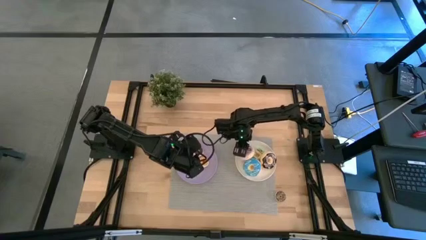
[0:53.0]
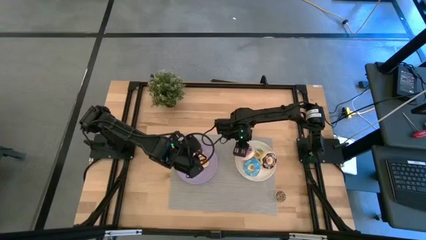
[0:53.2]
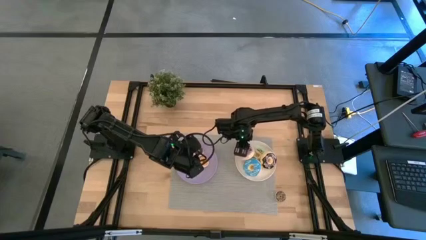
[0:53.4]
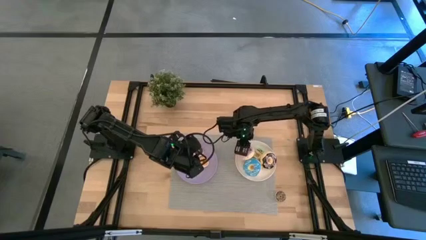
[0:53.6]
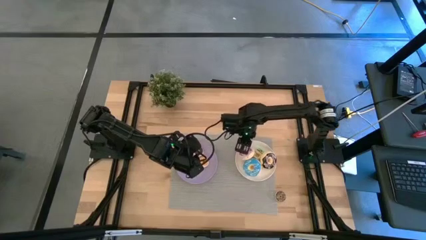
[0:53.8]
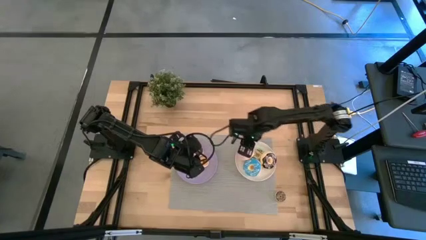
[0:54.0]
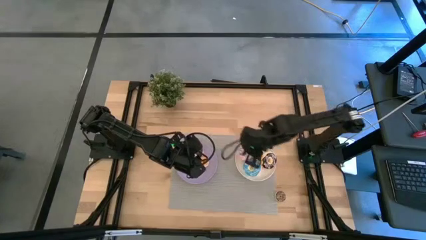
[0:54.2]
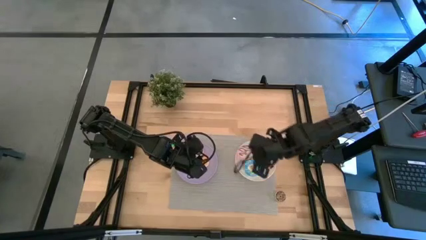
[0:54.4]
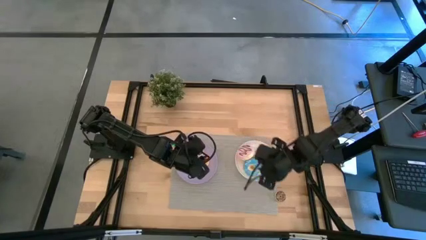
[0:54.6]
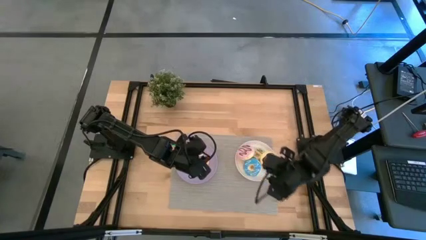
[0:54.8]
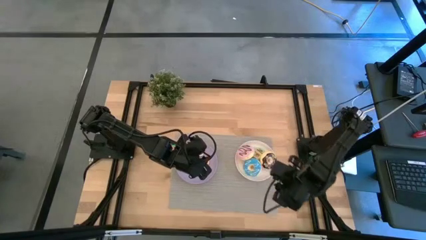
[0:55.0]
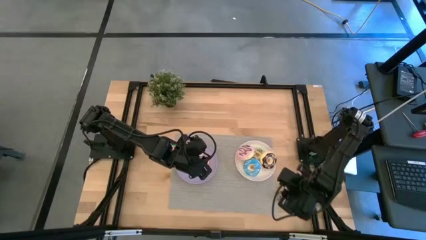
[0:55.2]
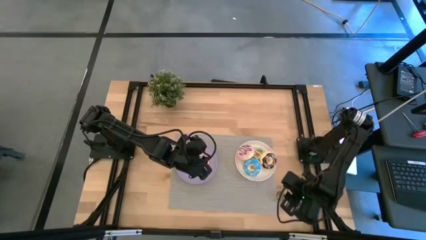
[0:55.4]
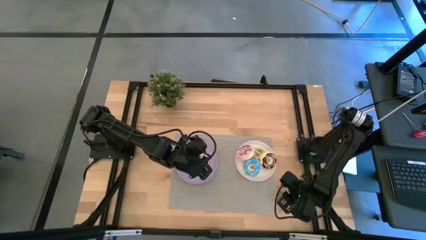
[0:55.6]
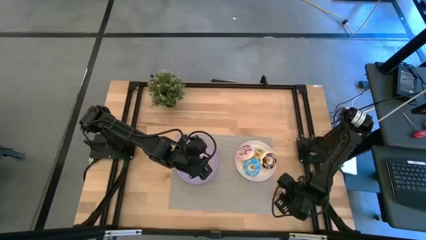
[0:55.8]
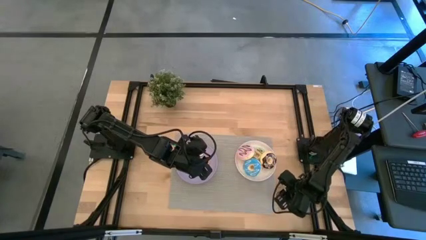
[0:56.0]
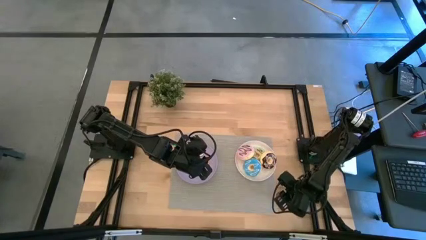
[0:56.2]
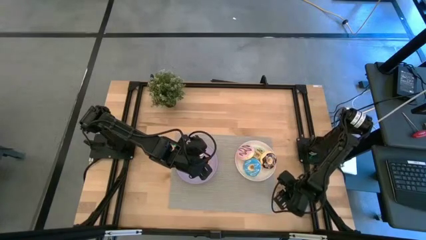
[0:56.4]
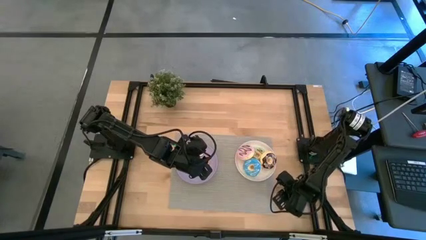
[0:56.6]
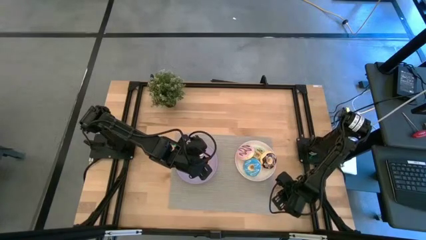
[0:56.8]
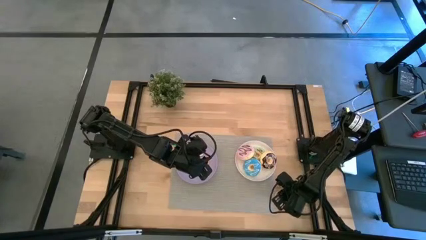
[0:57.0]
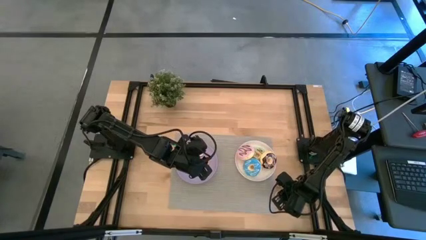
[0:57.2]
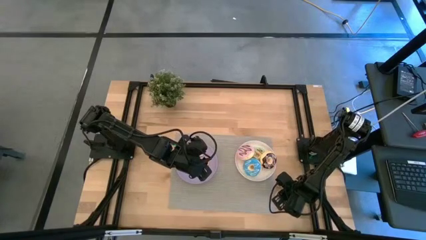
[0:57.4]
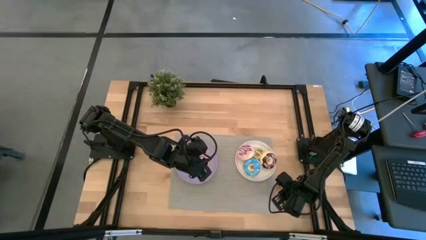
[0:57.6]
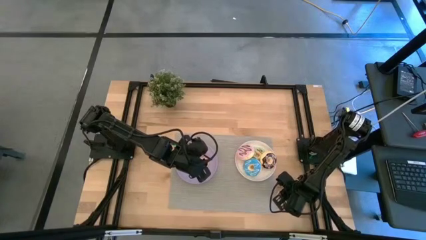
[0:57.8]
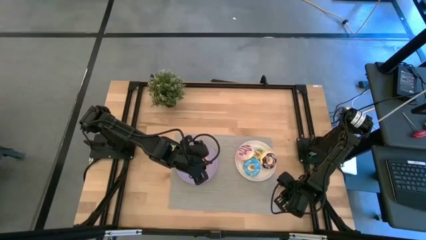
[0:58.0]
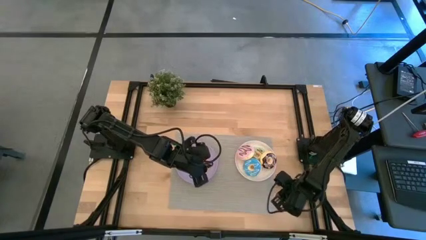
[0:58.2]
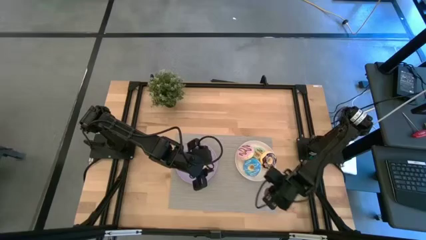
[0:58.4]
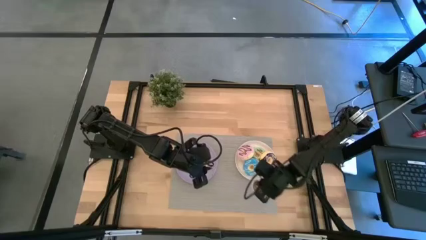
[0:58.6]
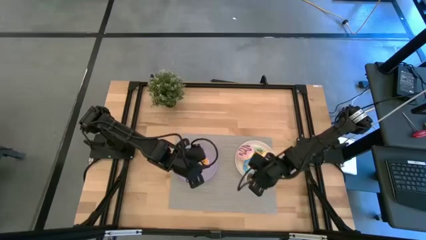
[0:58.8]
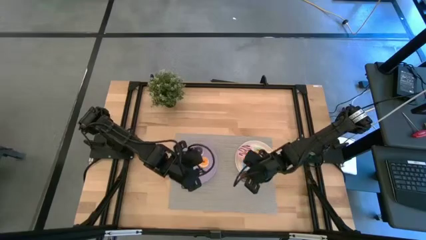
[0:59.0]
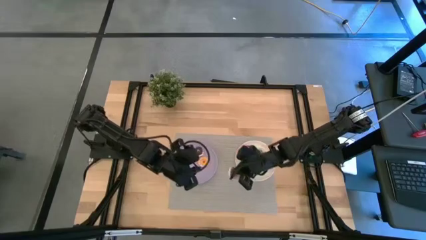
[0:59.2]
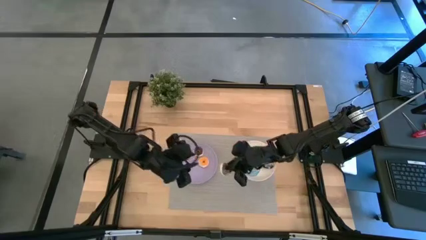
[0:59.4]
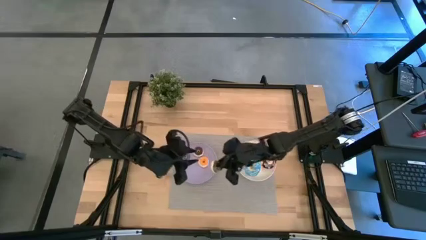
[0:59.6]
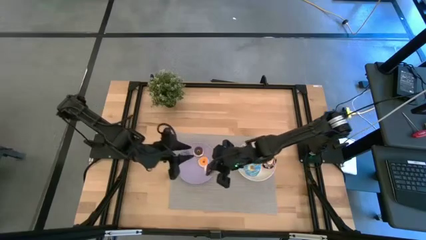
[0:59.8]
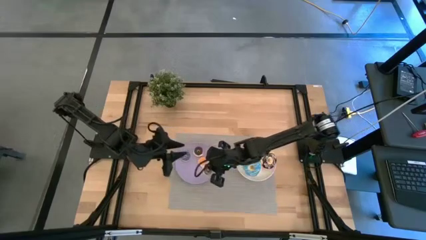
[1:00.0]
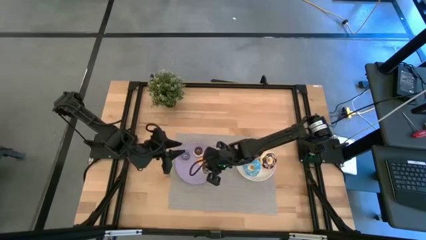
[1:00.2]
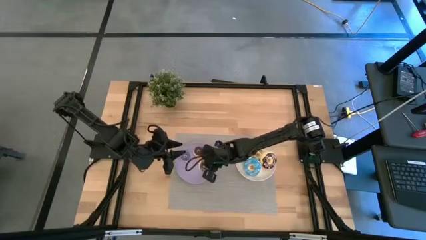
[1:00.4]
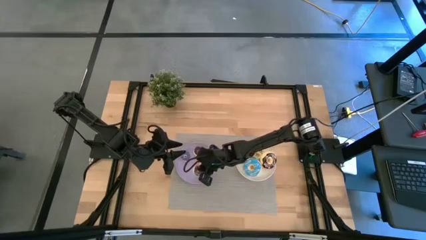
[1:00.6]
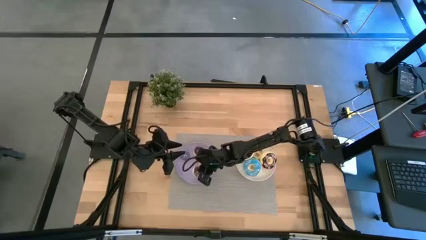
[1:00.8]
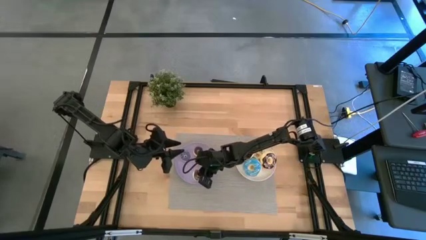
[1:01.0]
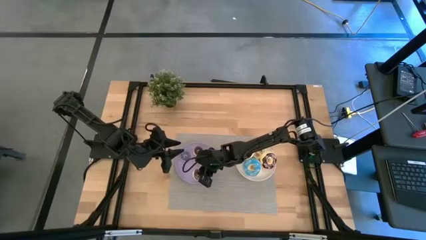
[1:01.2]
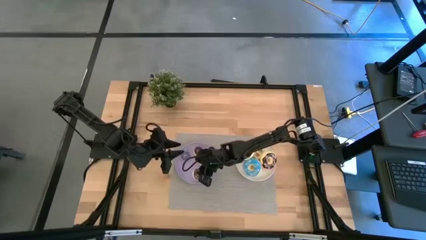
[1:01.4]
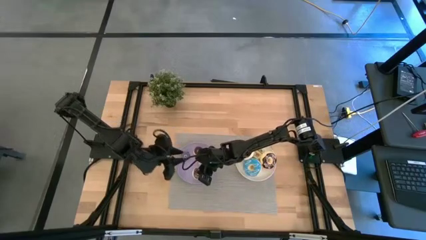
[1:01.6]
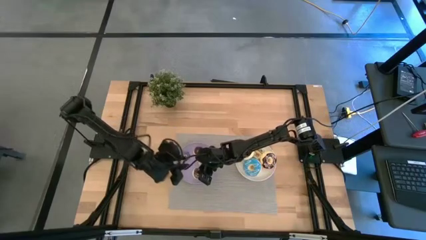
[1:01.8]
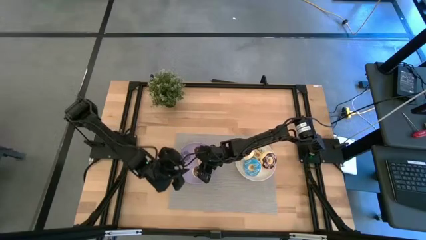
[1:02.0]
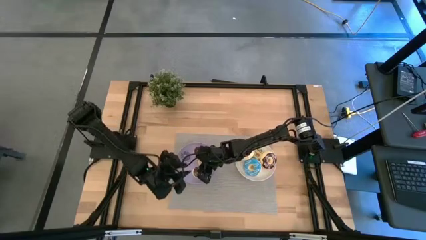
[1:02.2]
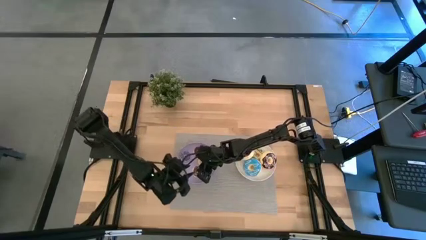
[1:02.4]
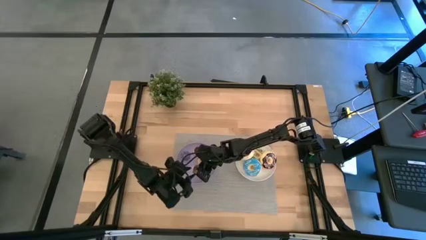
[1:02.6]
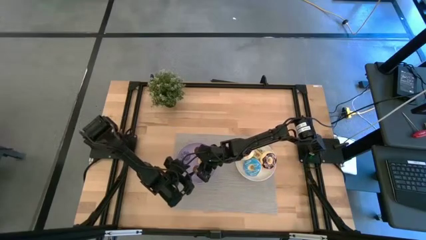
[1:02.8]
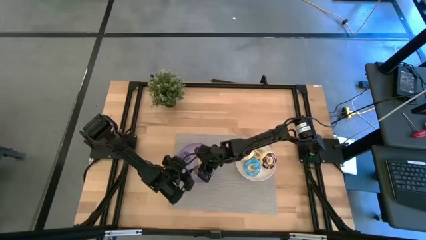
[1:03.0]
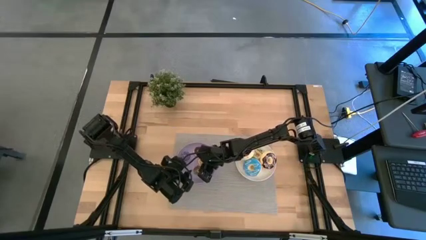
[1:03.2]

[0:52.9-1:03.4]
Task: Pick & Place donuts
Put the small brown donut on the purple plate

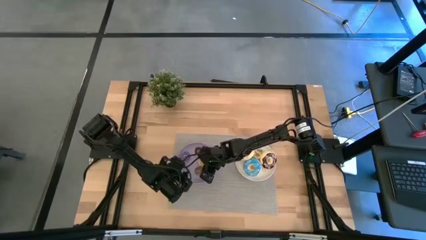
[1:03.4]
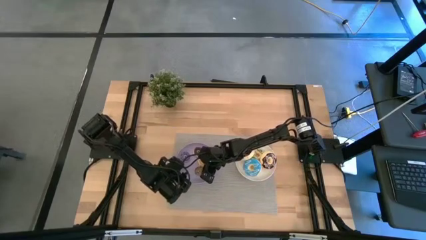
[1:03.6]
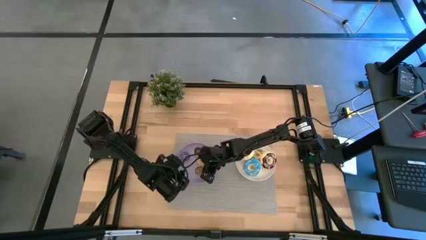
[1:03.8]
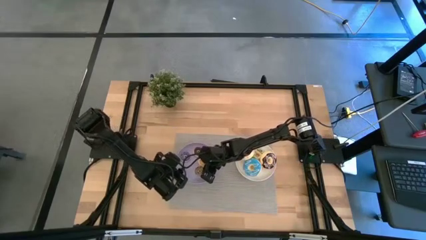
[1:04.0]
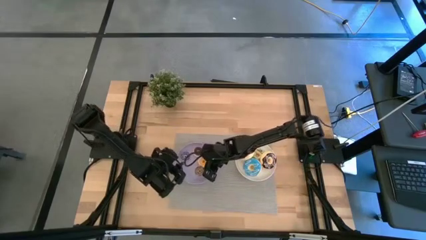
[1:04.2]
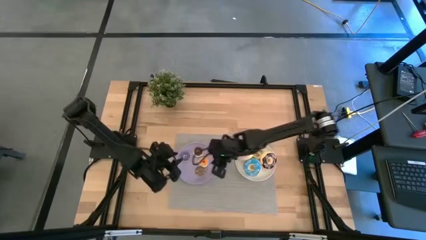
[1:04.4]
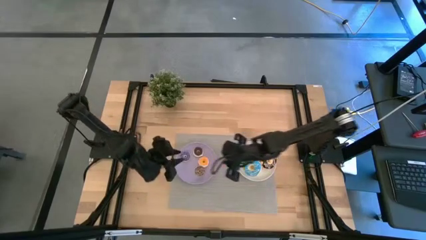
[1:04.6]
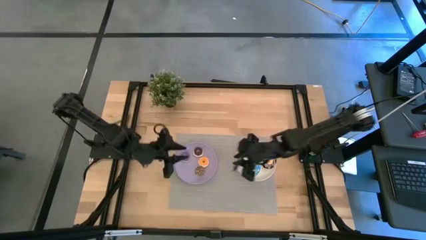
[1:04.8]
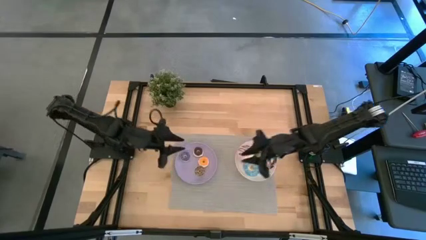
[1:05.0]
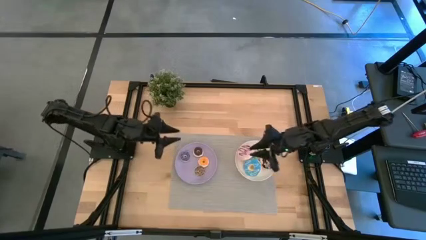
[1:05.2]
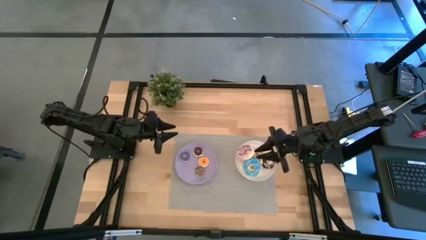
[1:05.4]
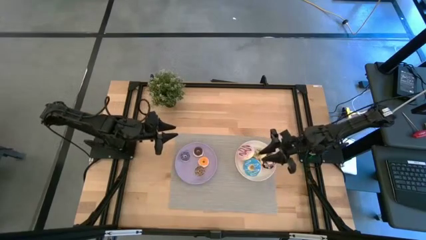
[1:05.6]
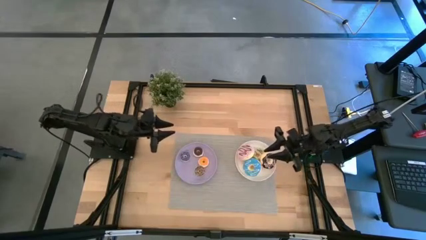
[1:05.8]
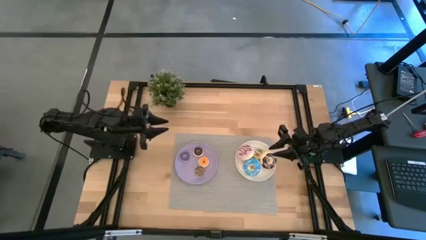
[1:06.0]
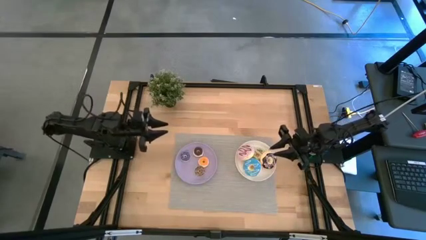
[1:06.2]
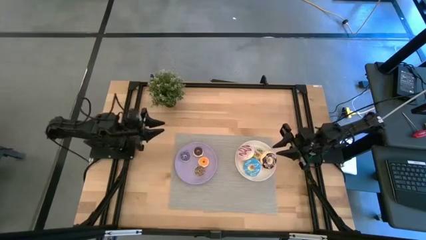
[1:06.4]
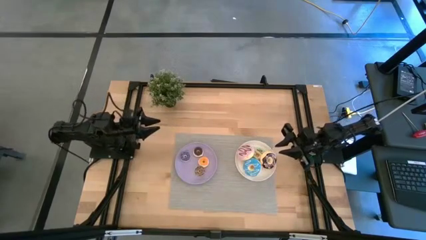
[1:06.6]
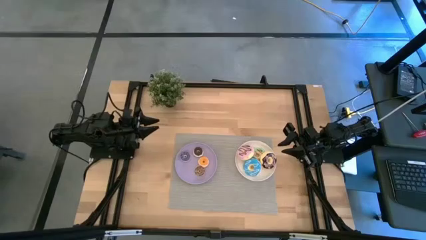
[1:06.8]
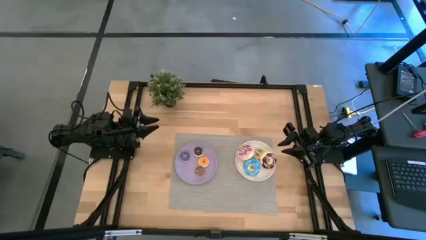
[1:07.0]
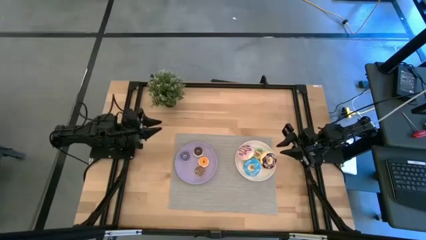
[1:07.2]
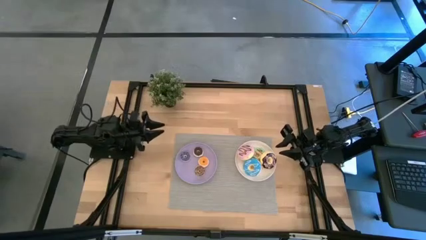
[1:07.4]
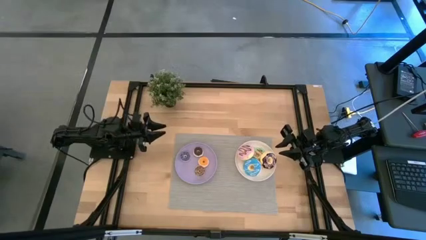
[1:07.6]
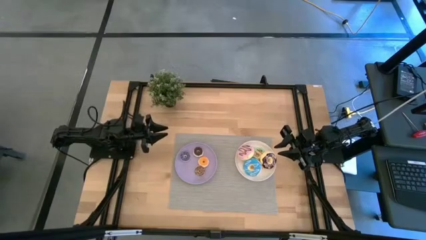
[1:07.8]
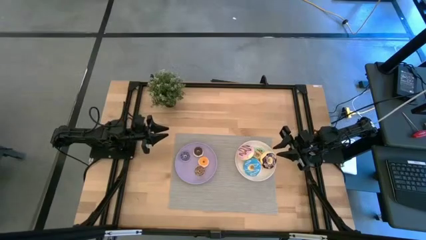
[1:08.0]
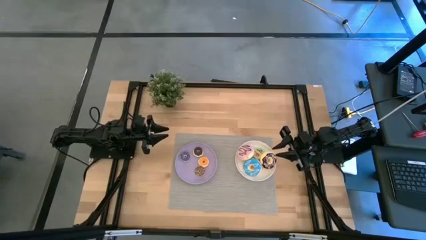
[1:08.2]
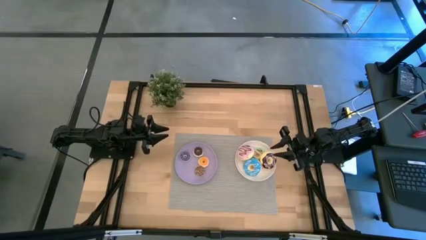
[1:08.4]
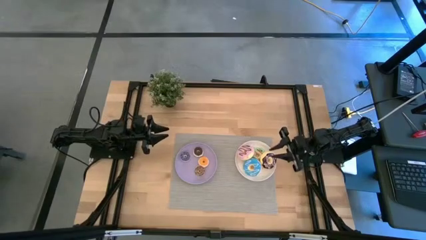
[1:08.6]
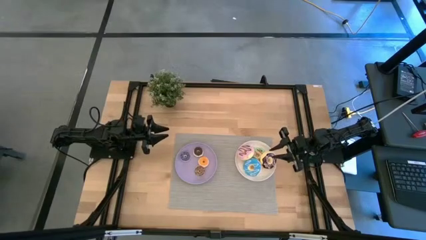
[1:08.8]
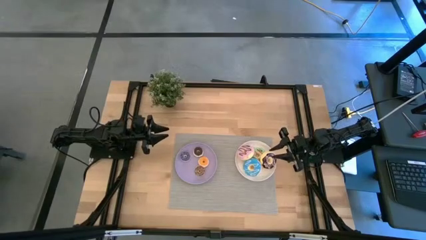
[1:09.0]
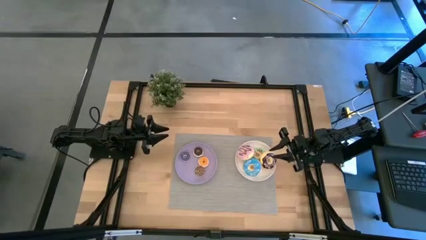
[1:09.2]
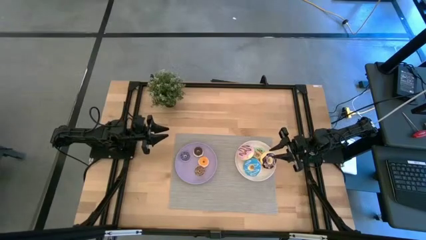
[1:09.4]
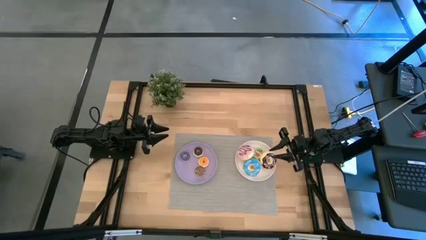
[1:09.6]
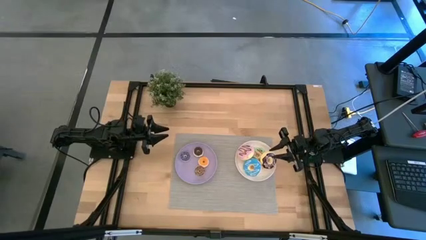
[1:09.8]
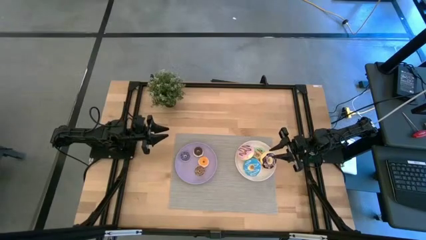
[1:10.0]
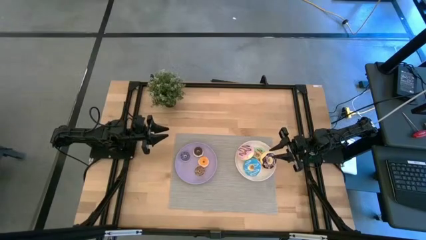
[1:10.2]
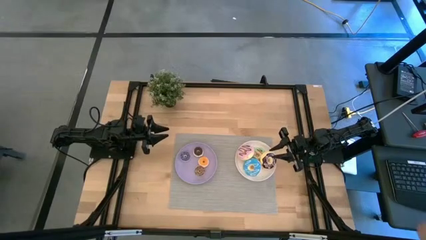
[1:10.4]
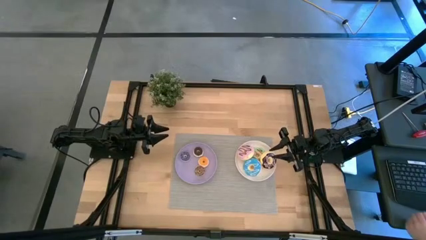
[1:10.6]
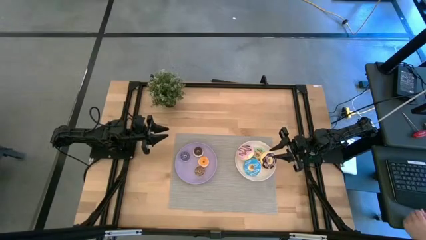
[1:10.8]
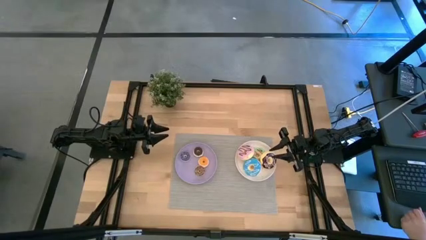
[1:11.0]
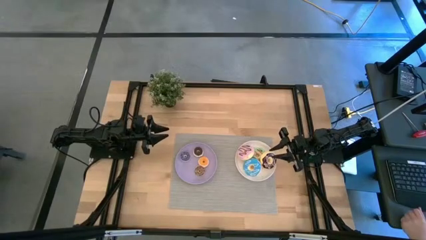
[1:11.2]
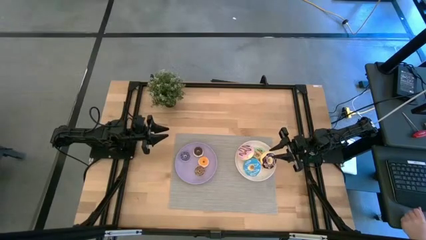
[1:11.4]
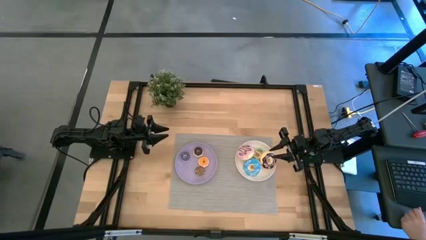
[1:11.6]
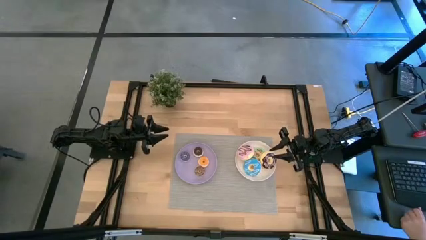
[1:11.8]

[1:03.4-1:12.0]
Return to Home Position
